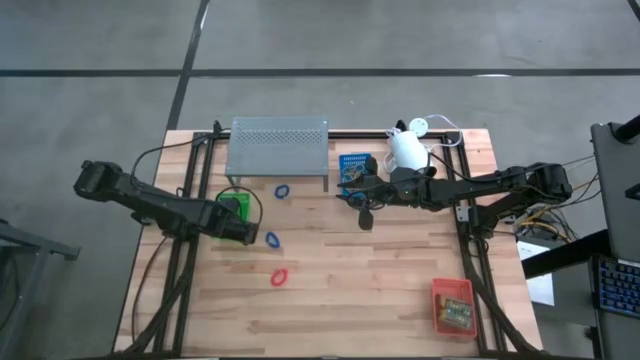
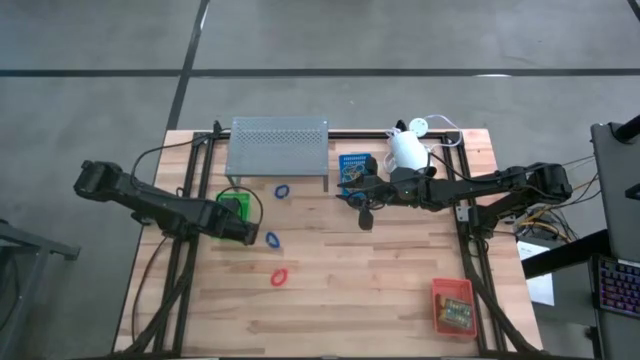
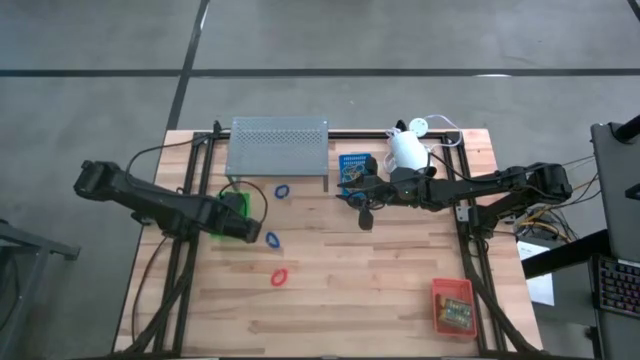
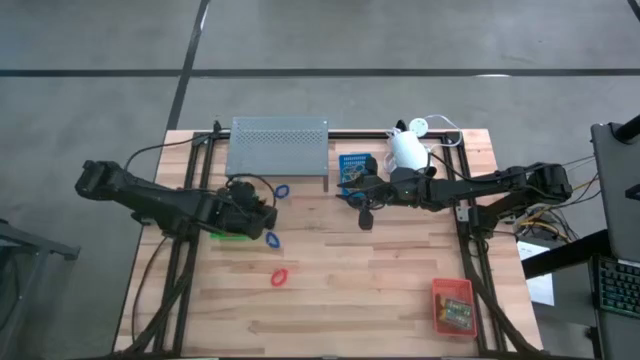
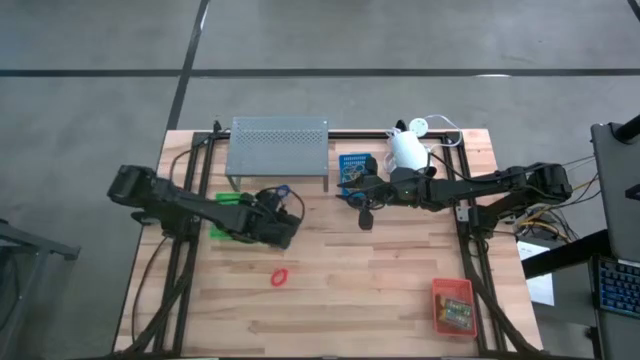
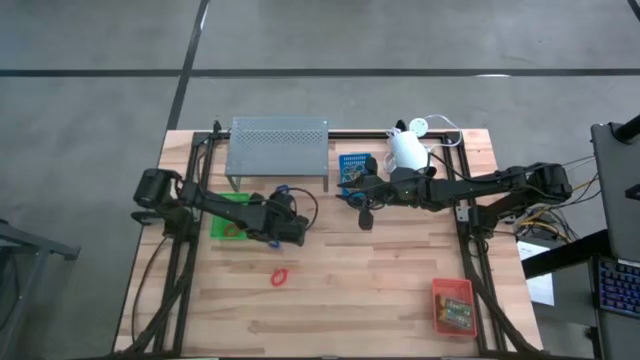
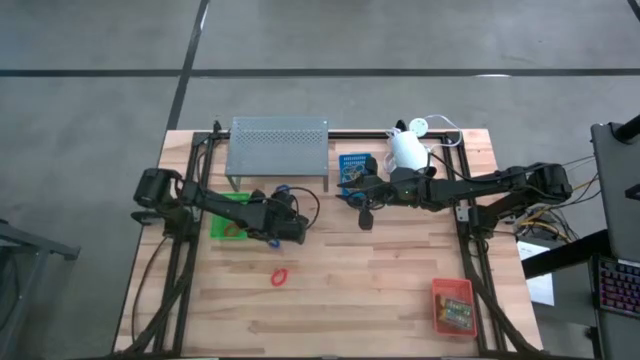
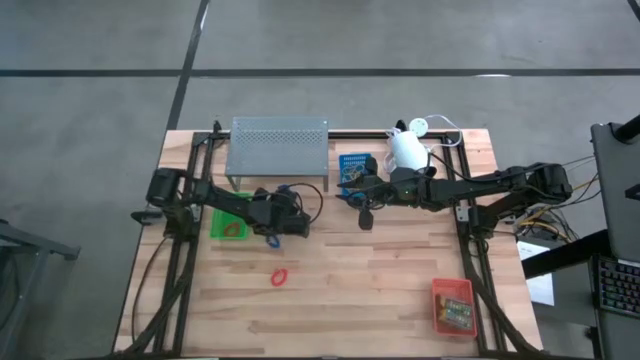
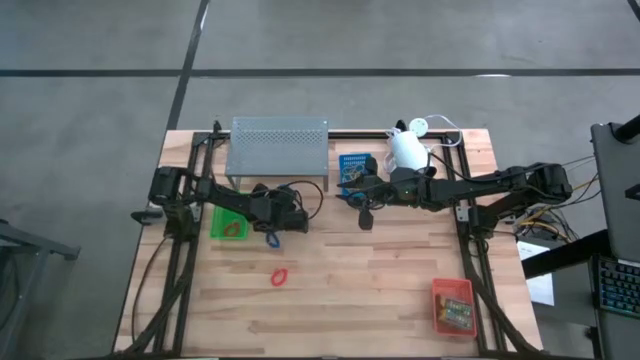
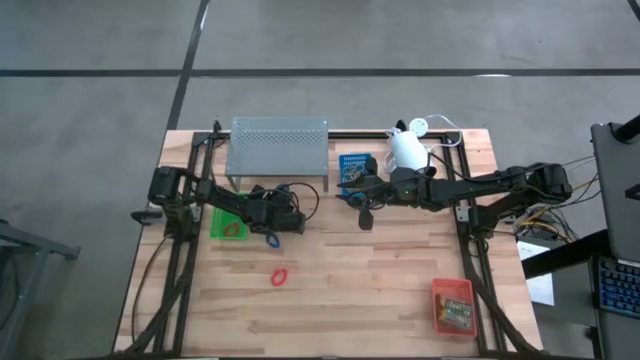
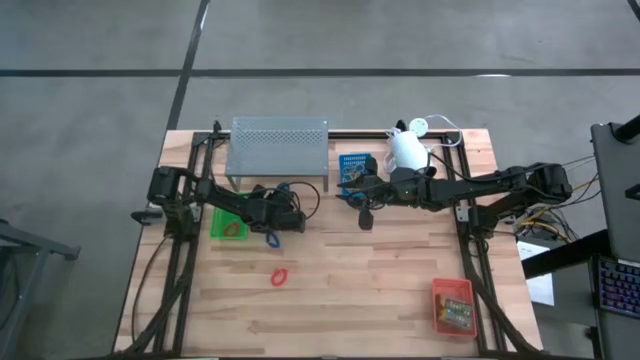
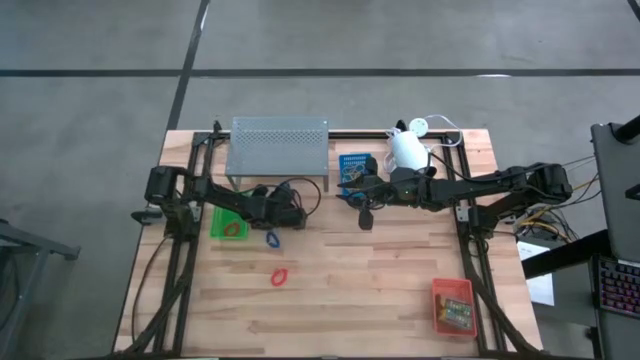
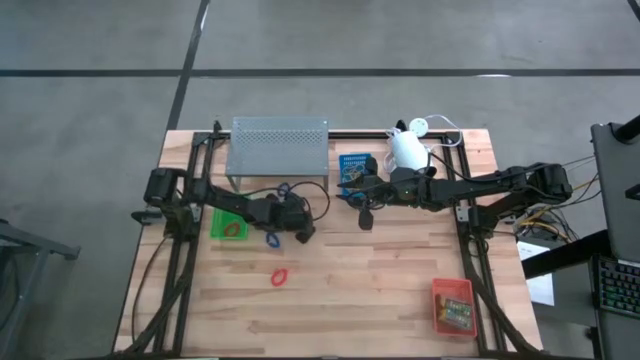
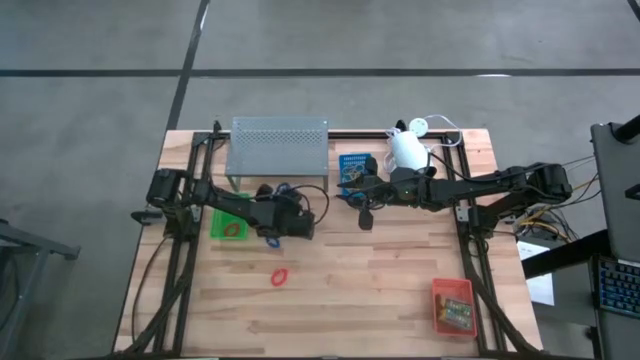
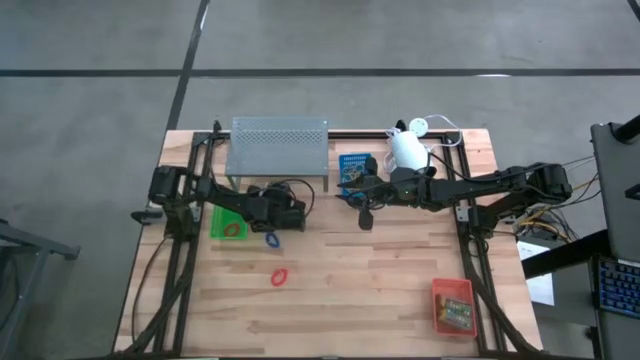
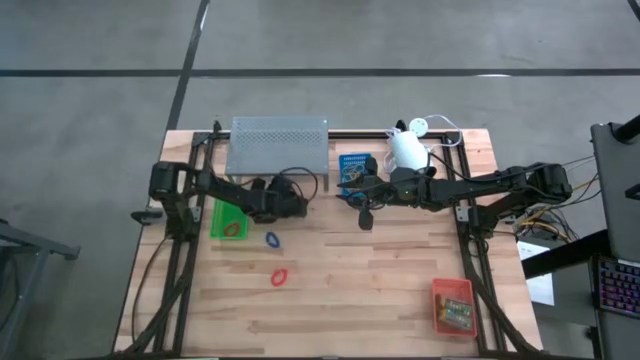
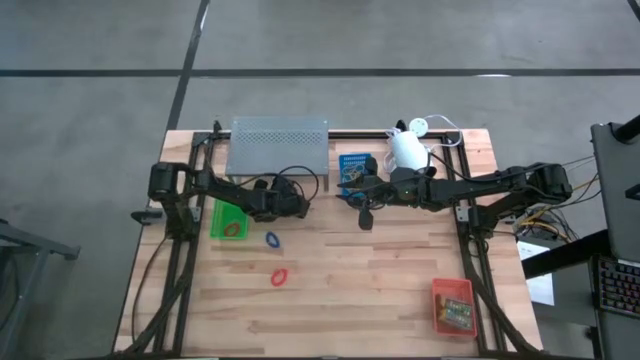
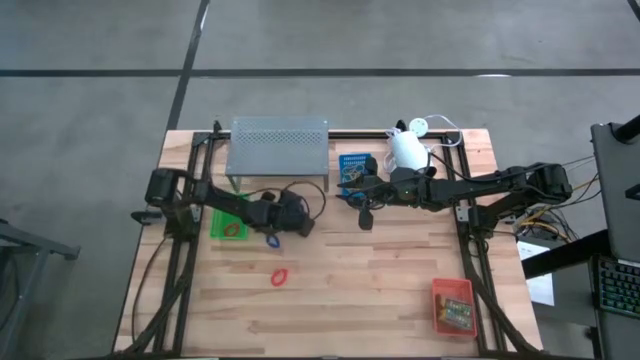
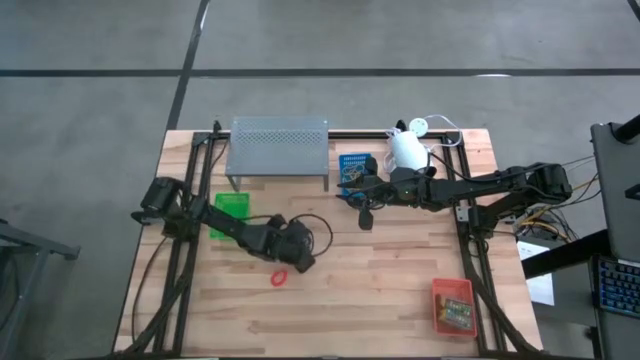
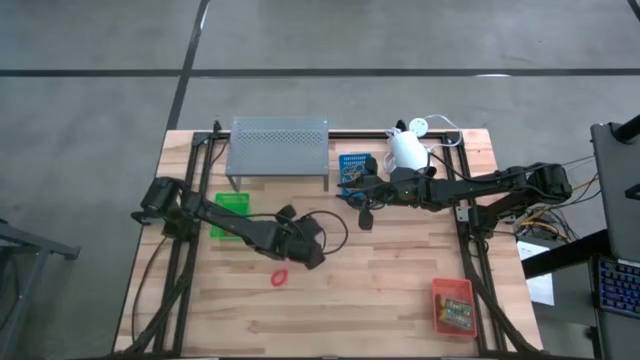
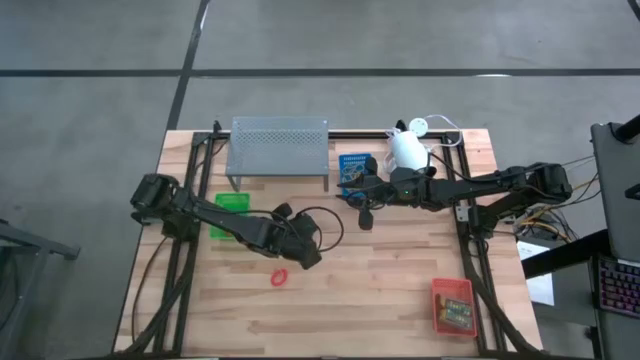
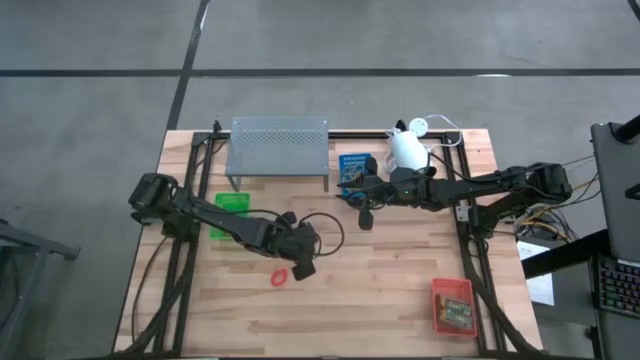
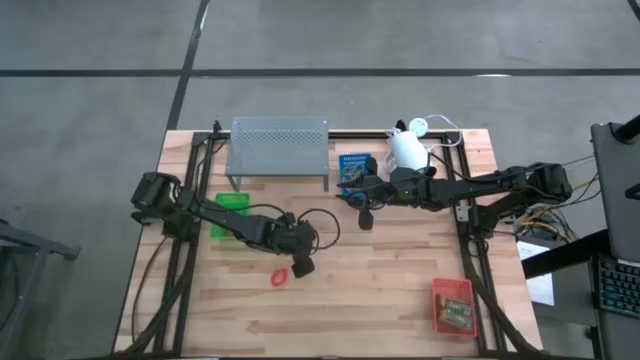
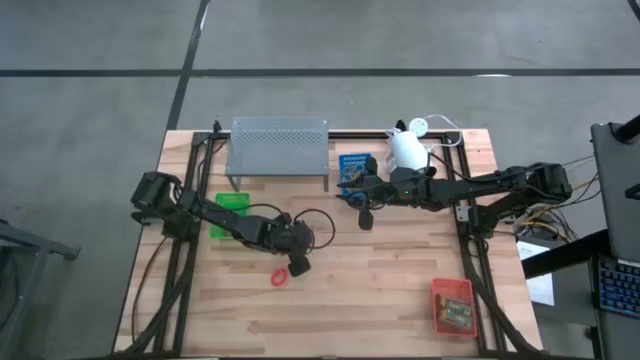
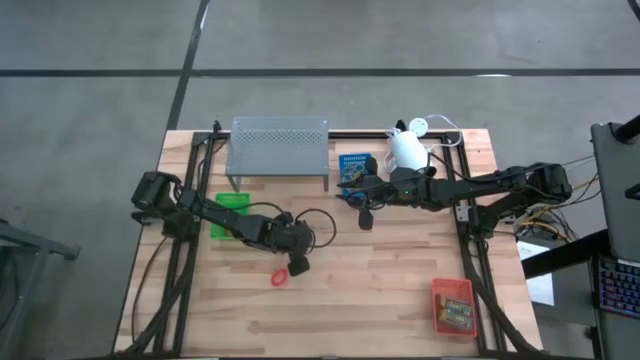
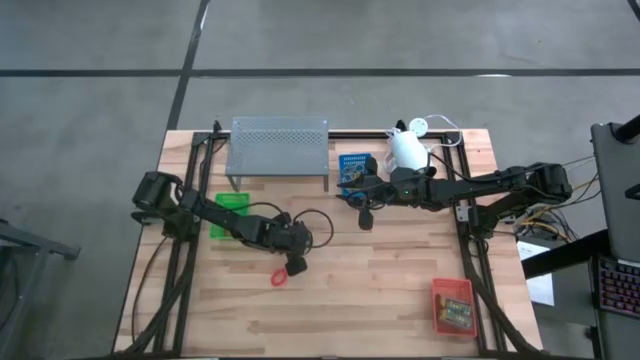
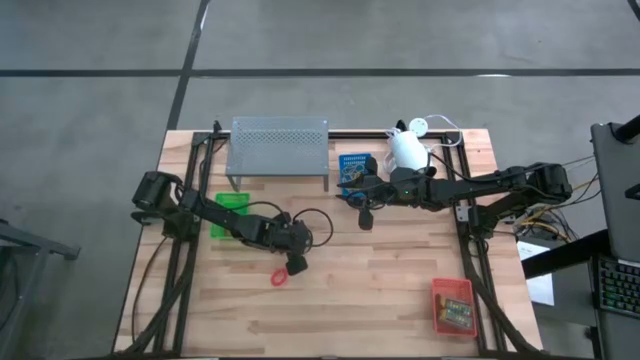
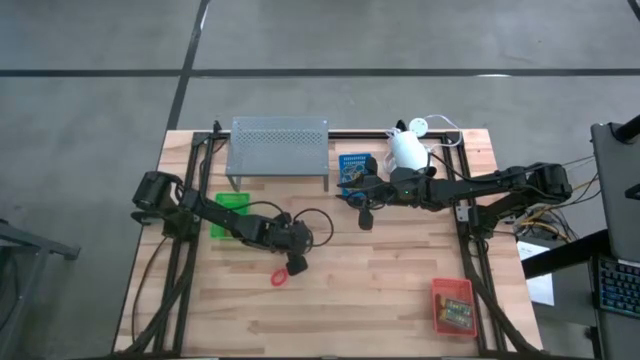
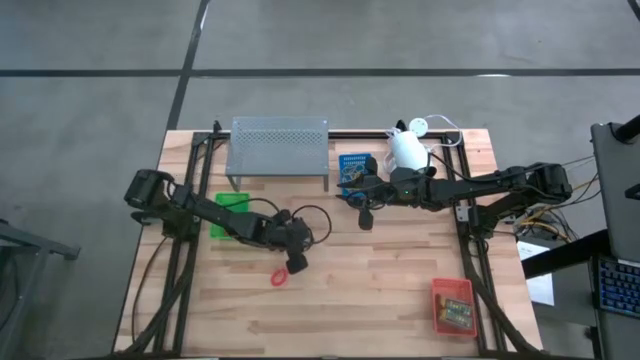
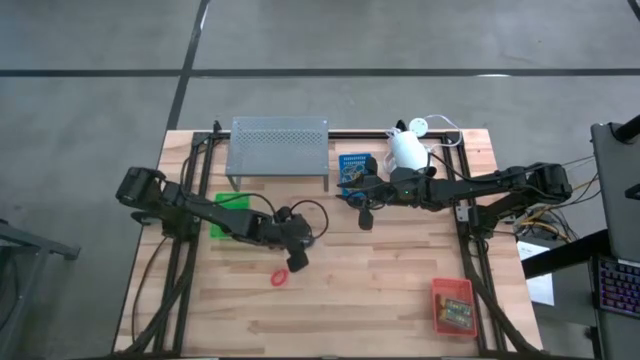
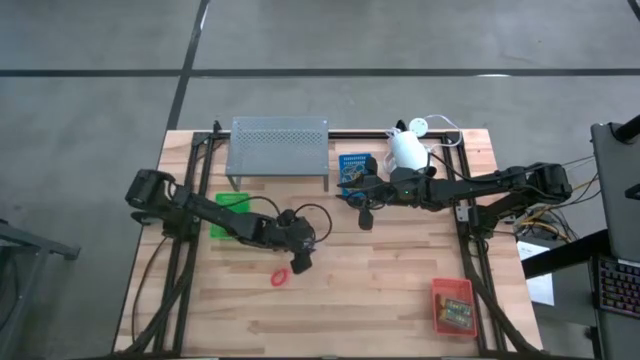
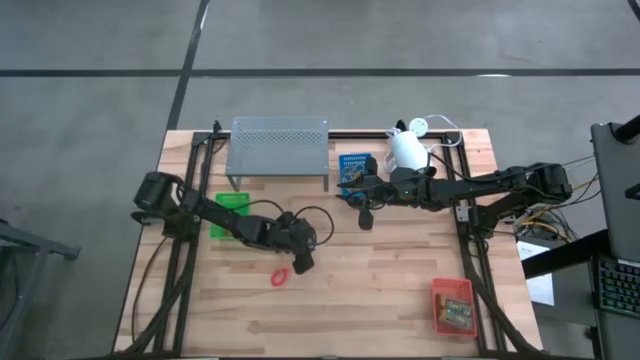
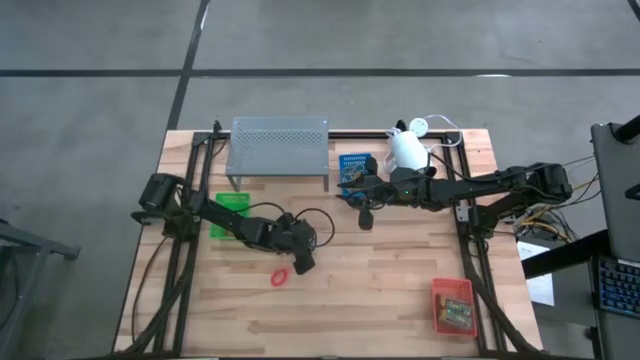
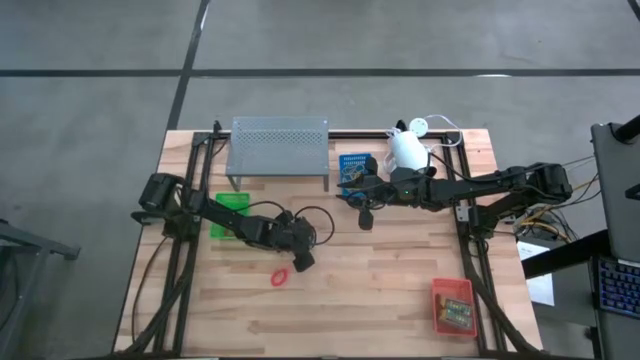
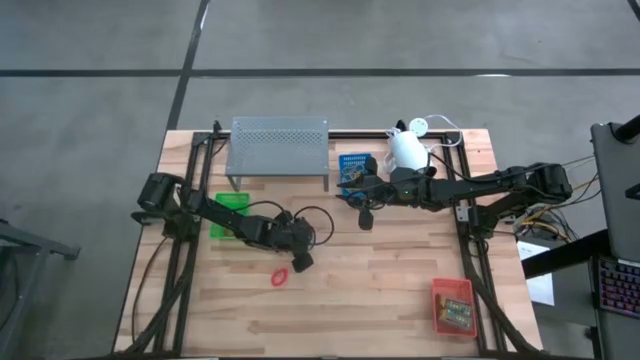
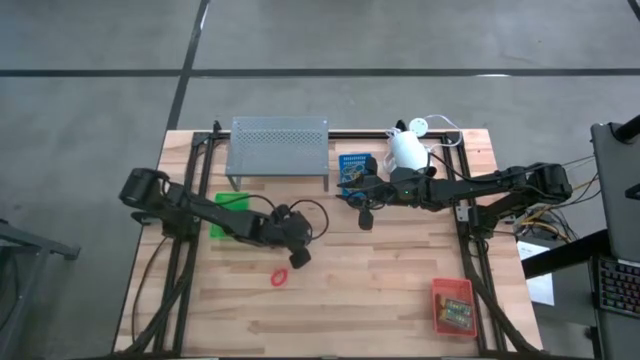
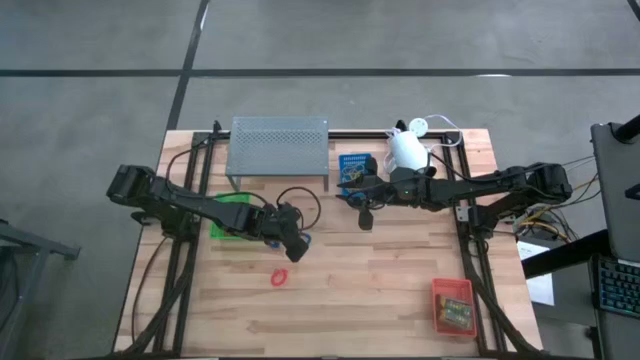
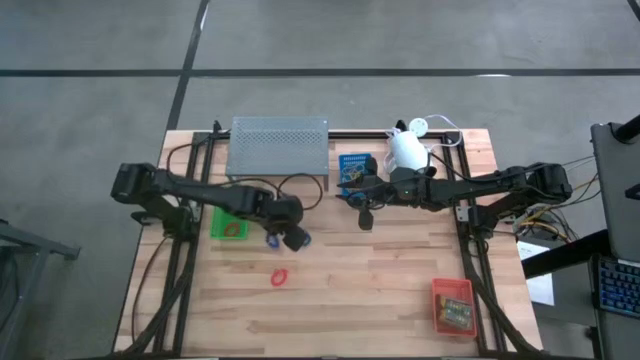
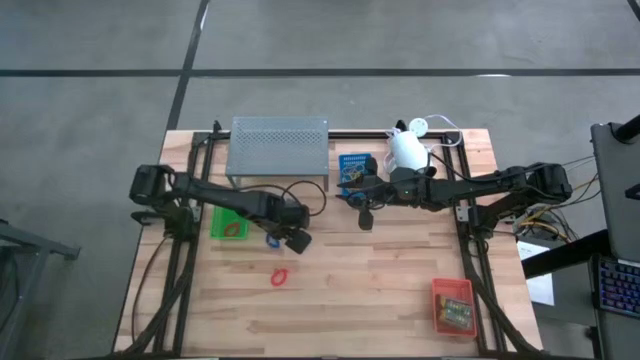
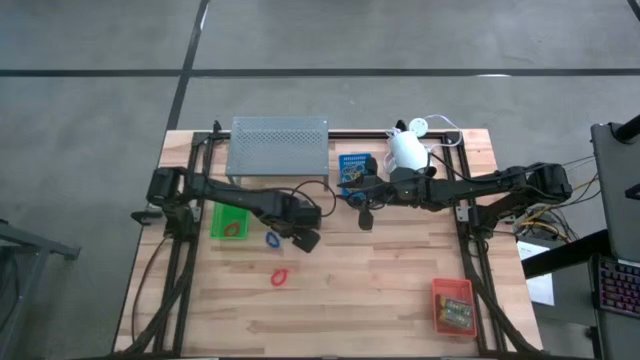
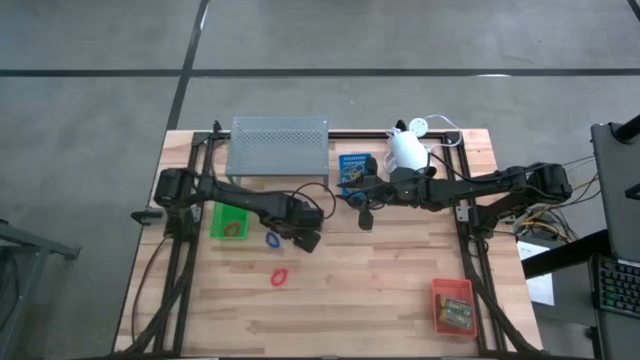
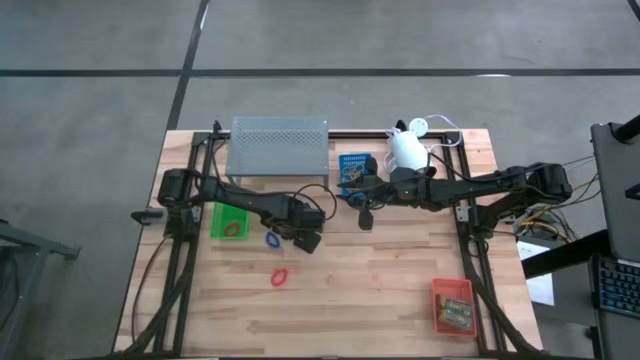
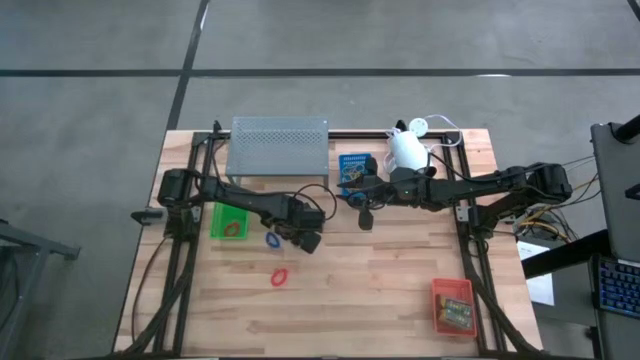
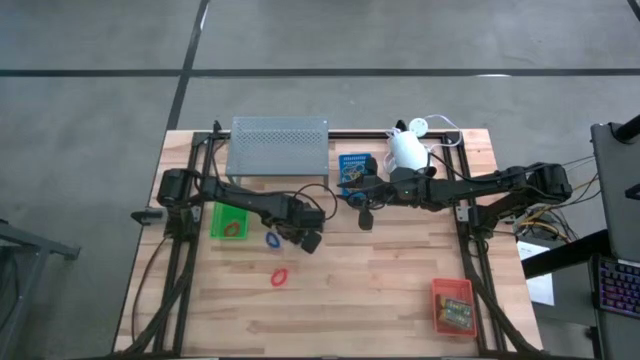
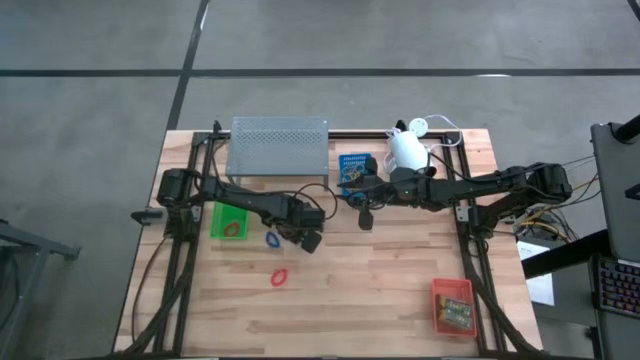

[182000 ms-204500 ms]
Task: Pick & Place Office Desk Supplies
Put the blue spring keychain into the green bin
